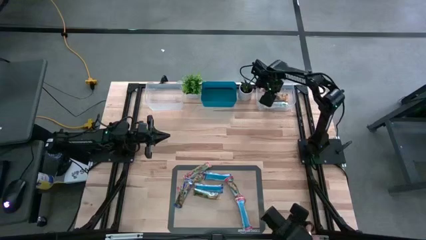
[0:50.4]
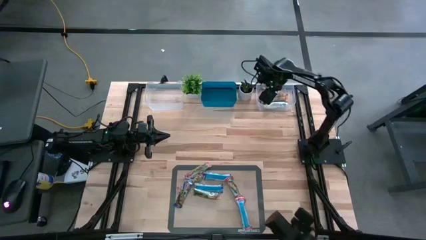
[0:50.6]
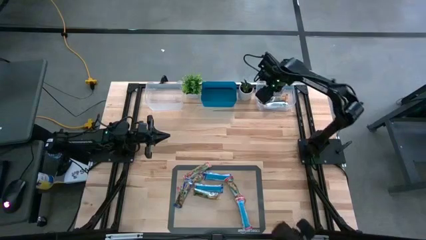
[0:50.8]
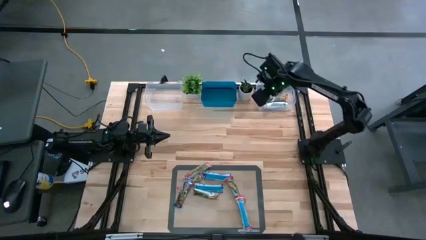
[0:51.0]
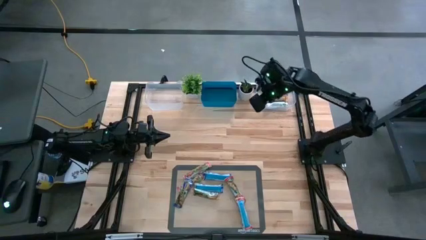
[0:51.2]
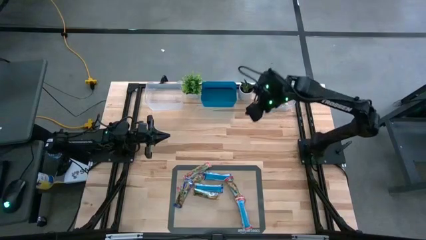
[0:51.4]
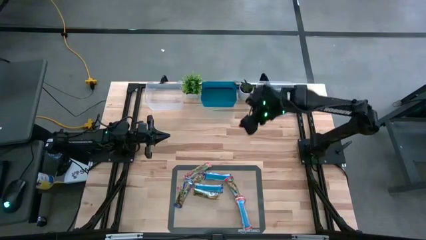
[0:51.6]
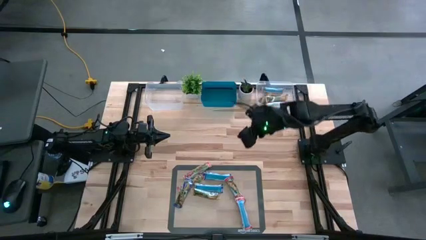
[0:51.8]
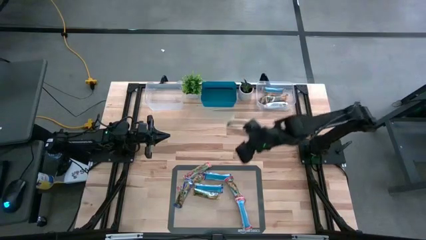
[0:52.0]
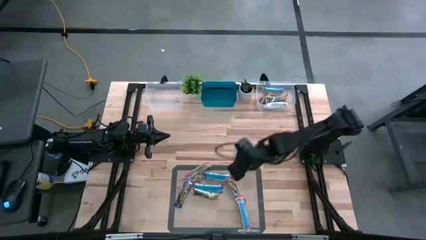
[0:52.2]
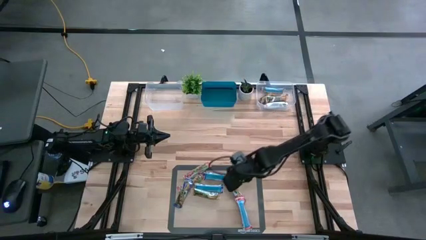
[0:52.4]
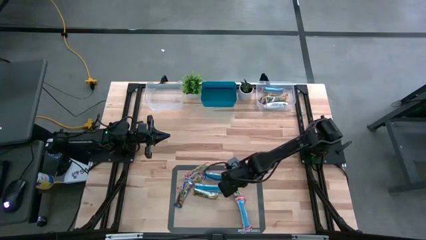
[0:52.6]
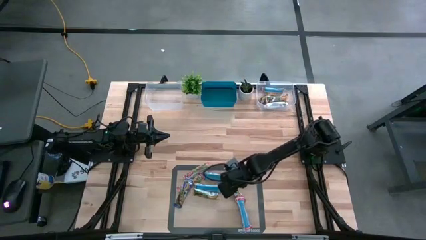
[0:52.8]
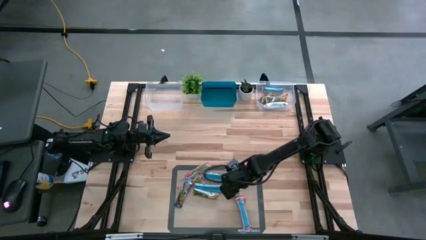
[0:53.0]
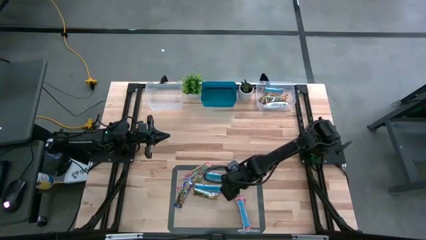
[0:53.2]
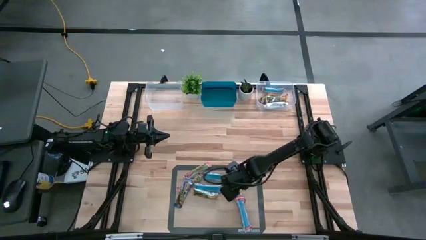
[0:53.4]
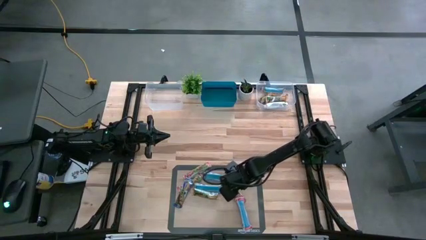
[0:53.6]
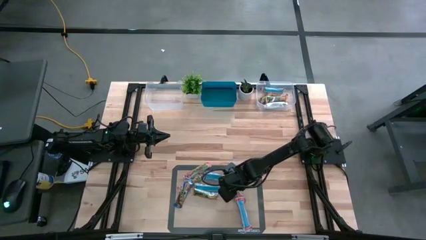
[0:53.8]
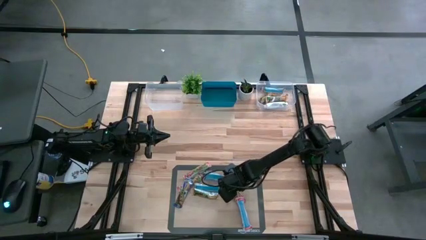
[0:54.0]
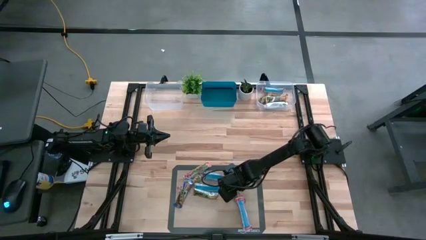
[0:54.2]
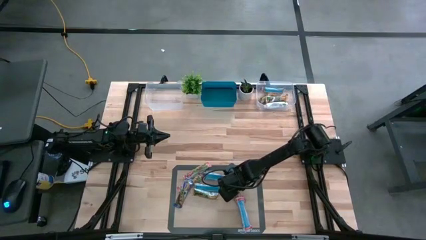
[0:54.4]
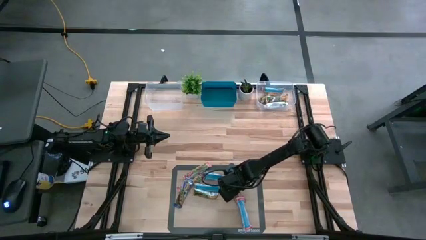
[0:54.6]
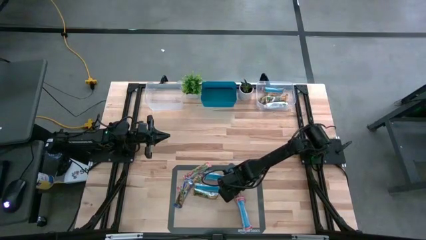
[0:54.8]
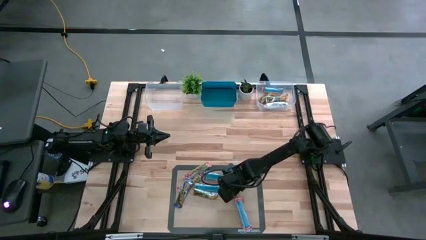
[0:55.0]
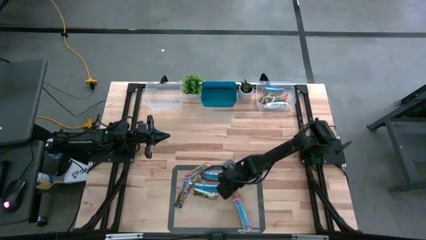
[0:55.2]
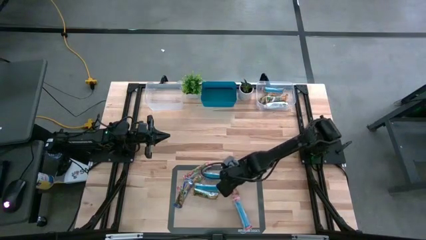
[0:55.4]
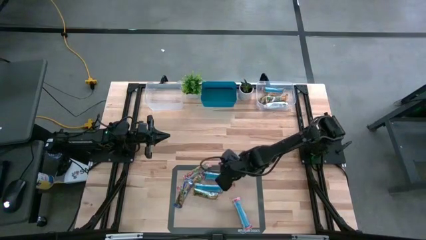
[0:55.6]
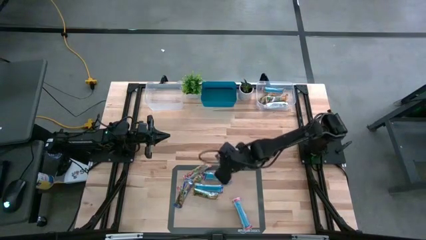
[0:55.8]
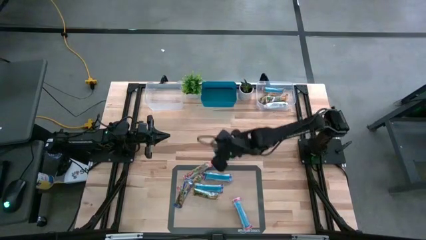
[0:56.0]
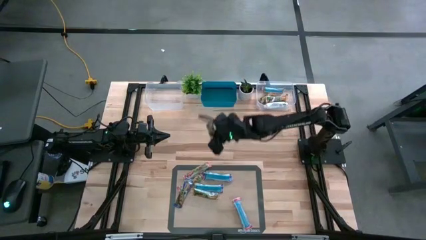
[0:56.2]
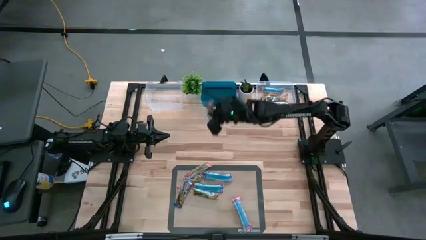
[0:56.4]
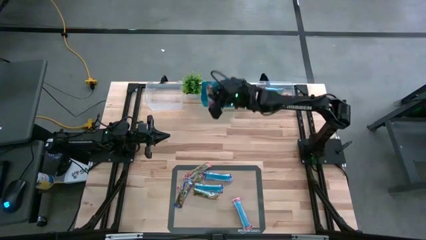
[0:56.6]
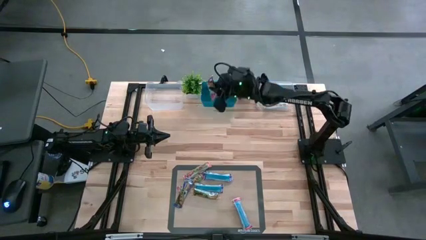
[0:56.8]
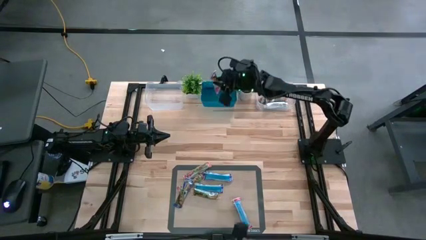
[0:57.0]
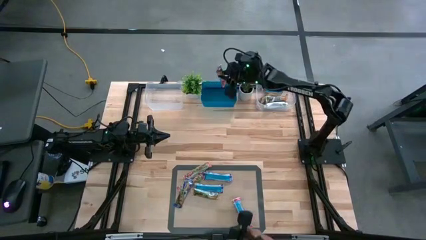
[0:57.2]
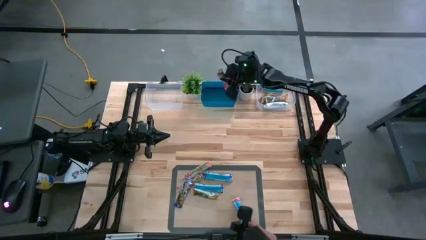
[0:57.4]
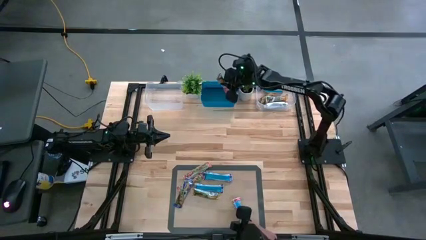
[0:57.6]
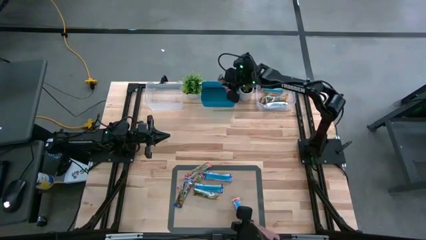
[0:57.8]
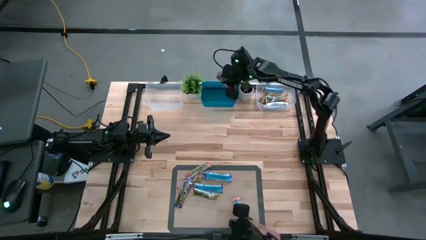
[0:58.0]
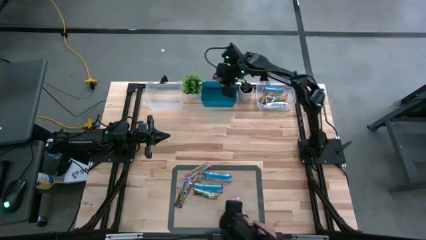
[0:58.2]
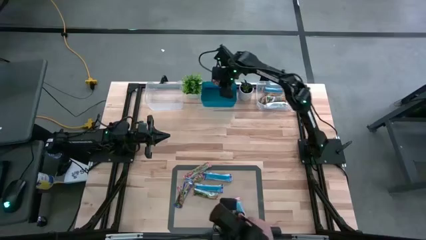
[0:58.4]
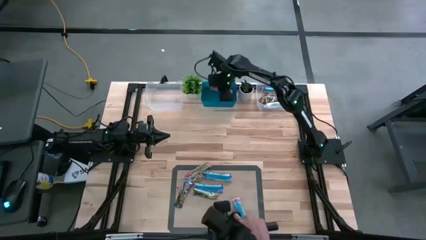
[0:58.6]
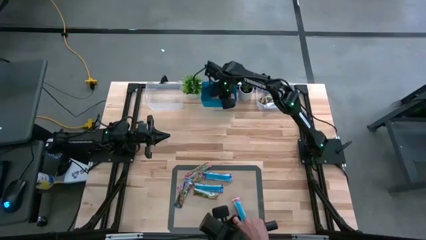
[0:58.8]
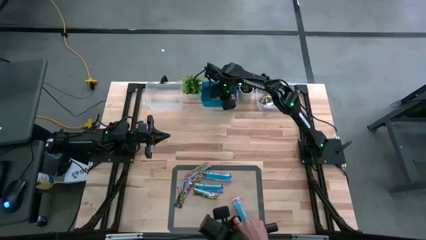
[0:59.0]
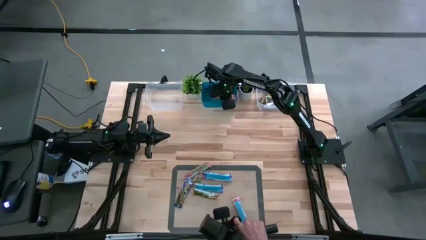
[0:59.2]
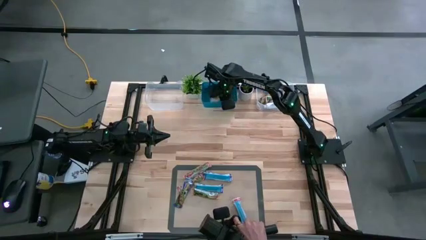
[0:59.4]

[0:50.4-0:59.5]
Task: Pick and place Granola Bars by type
Put the red granola bar into the blue bin

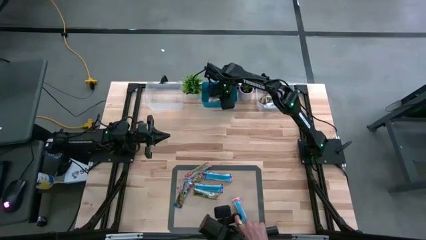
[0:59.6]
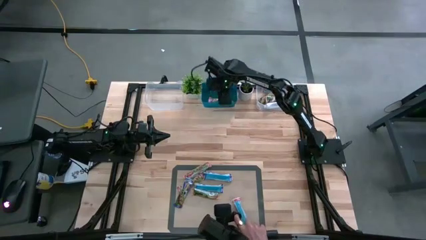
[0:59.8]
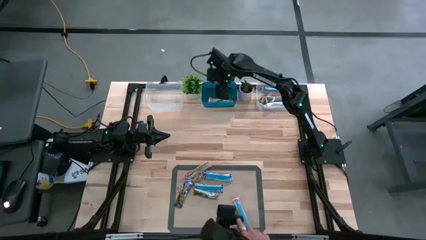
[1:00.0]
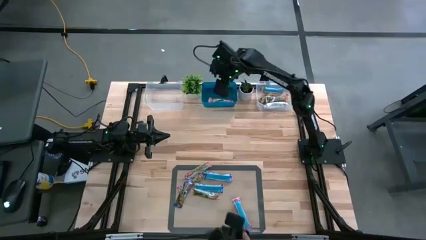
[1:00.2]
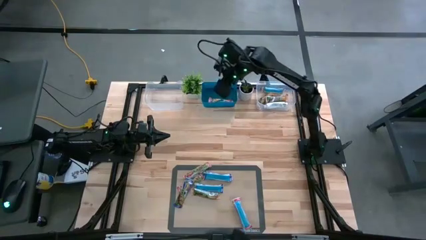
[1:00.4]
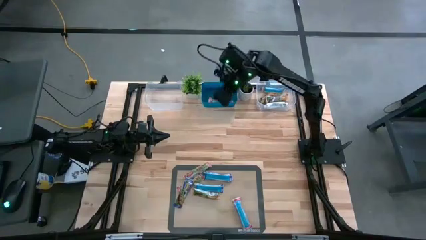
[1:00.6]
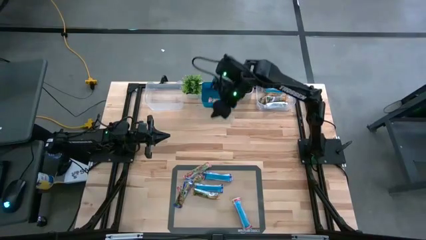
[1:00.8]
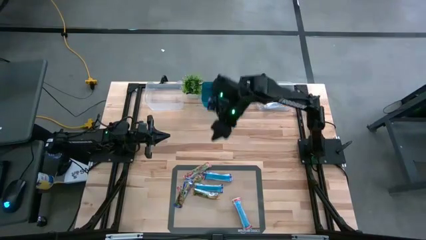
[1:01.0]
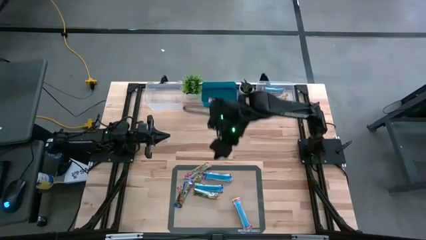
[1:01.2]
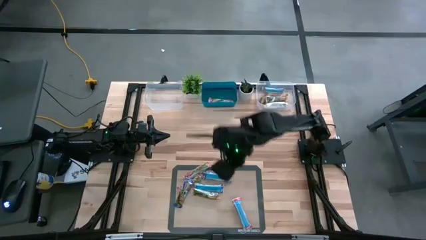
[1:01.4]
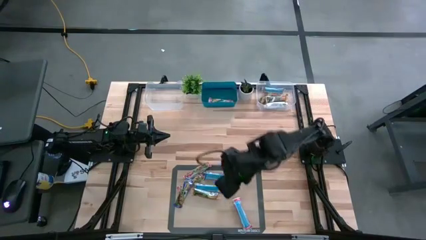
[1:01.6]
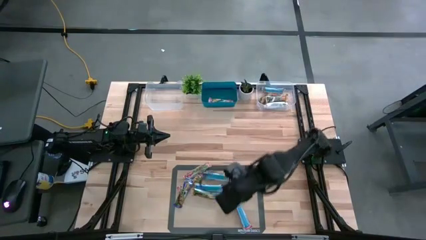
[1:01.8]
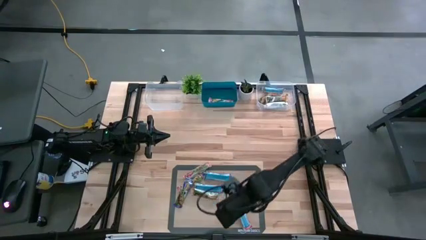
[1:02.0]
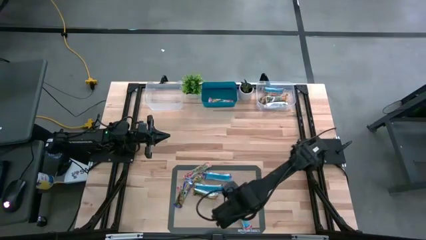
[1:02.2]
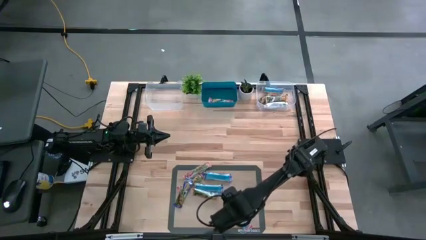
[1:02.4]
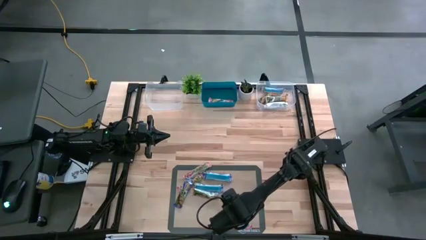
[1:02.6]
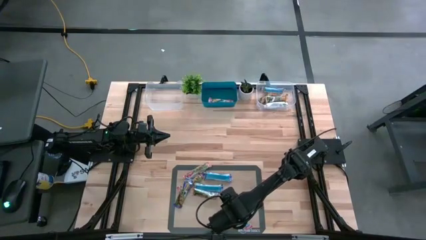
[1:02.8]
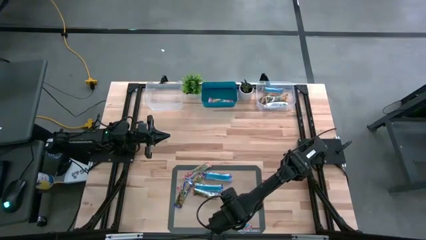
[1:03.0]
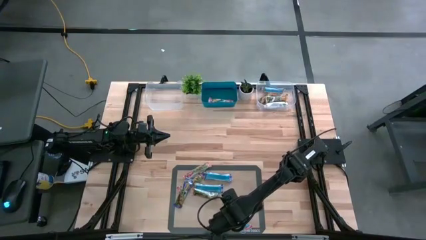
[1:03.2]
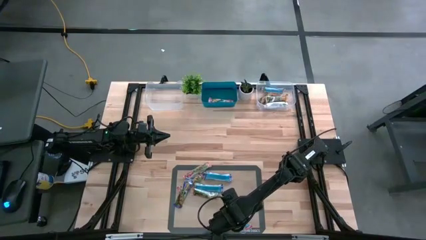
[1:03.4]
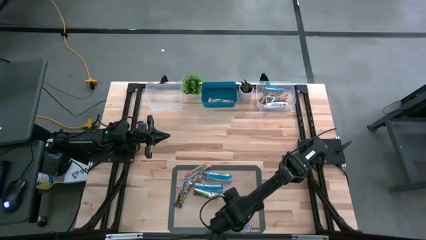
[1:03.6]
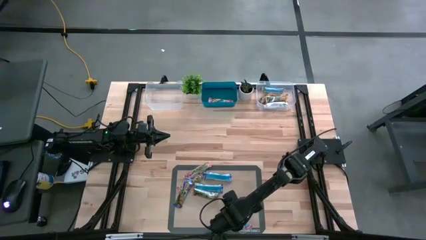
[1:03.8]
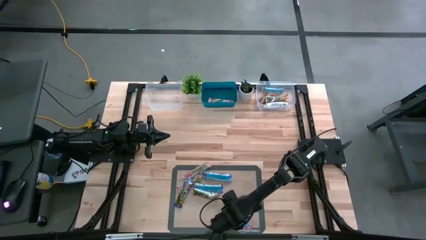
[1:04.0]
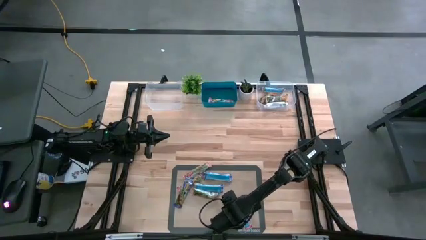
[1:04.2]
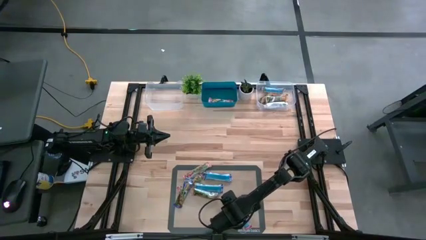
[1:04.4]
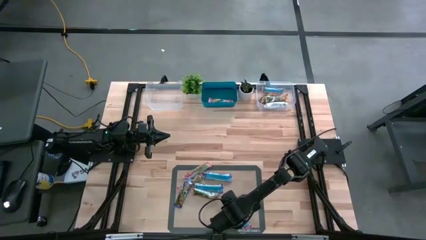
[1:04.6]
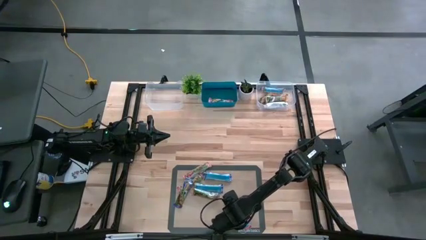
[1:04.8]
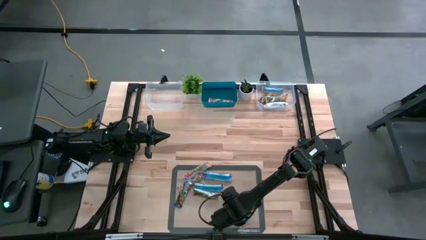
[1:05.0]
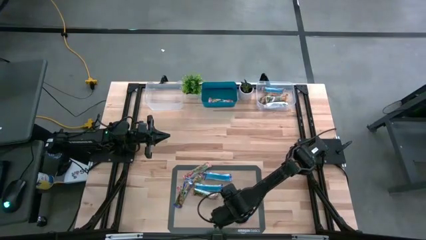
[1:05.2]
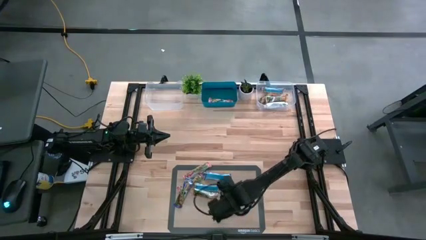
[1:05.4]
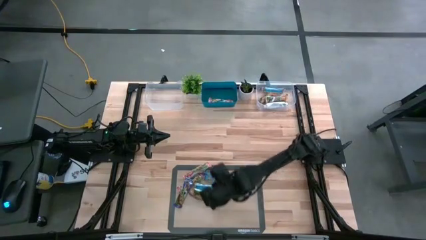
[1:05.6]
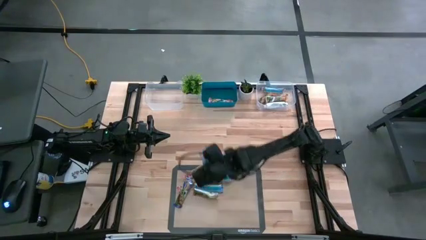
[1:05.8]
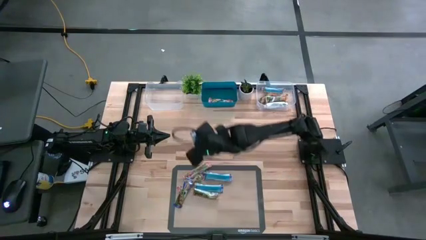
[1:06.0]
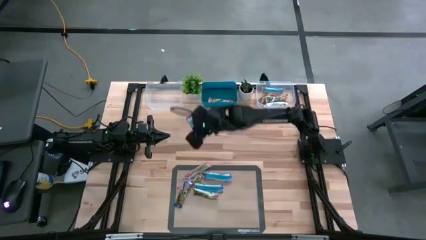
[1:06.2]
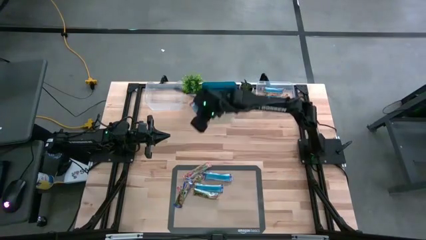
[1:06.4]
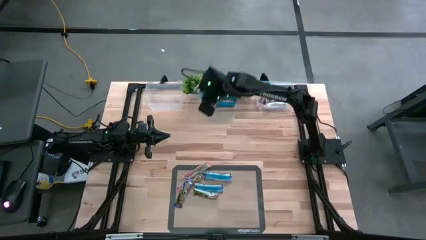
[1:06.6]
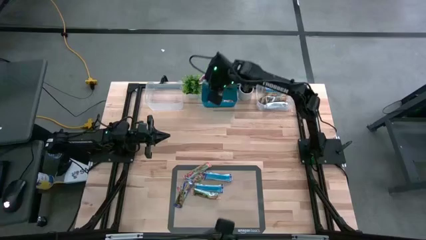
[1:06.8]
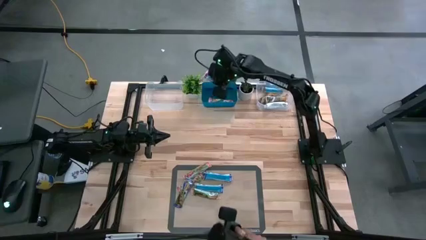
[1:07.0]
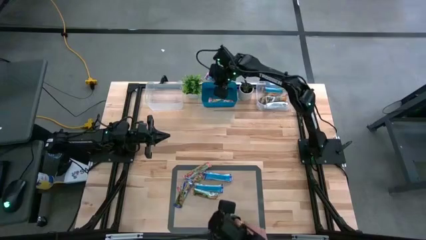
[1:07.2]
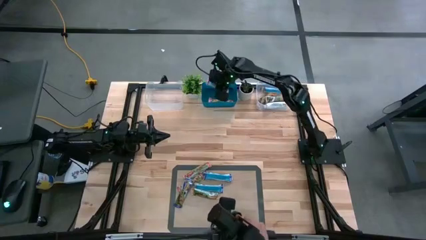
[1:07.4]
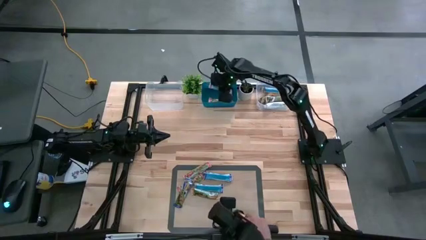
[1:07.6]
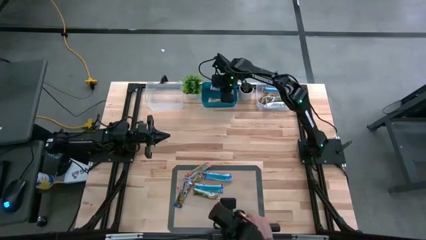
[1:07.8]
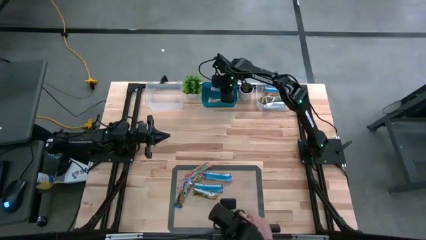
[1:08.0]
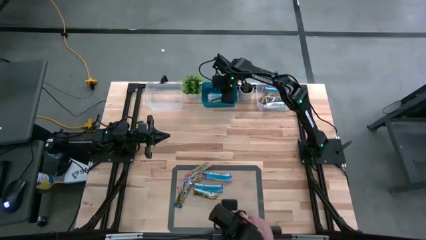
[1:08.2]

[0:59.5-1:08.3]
Put the red granola bar into the blue bin
